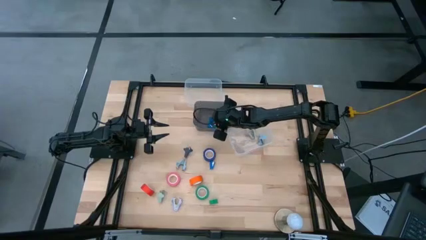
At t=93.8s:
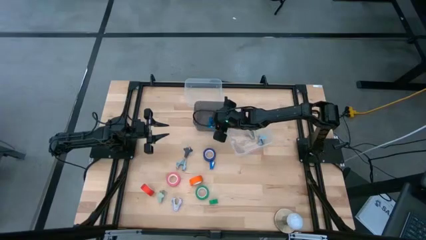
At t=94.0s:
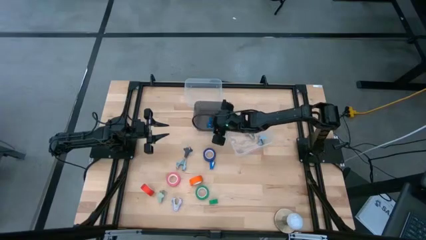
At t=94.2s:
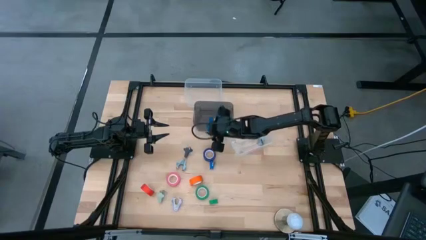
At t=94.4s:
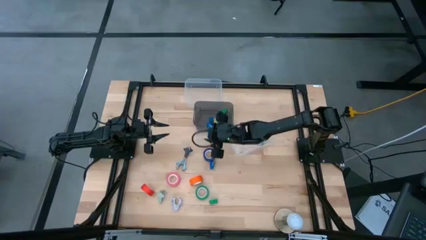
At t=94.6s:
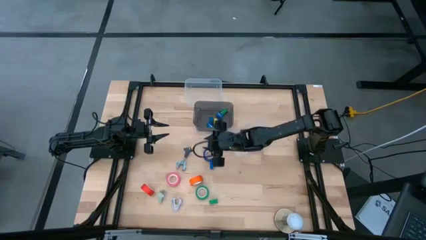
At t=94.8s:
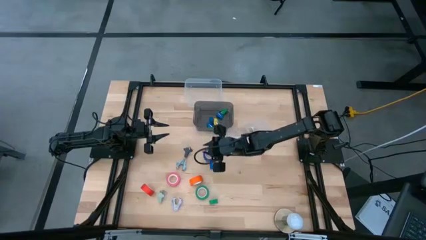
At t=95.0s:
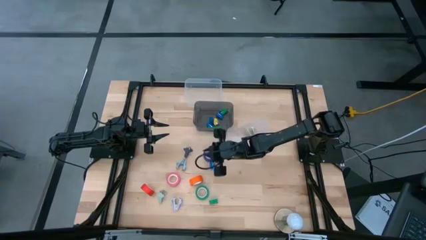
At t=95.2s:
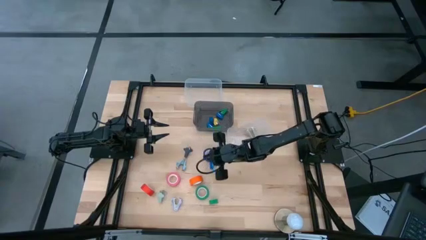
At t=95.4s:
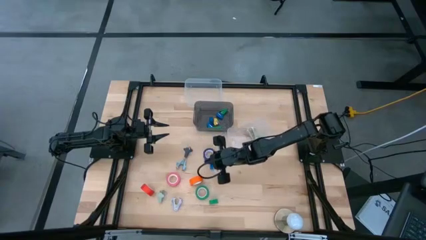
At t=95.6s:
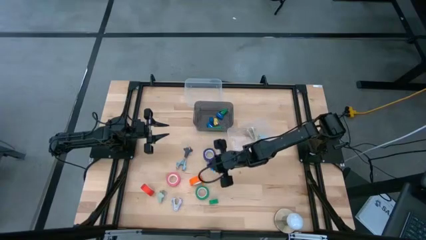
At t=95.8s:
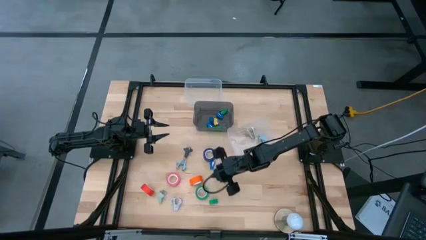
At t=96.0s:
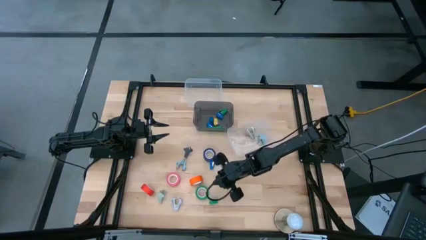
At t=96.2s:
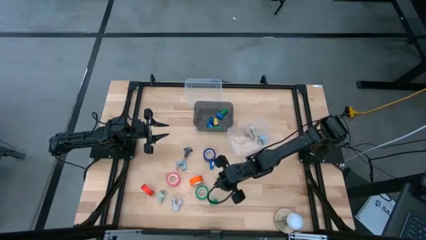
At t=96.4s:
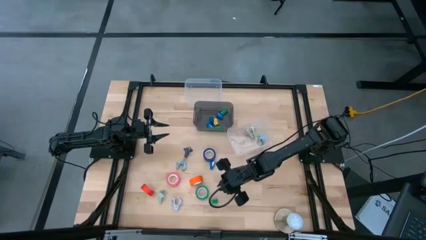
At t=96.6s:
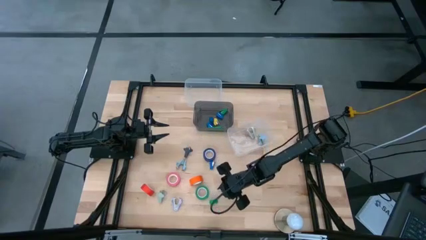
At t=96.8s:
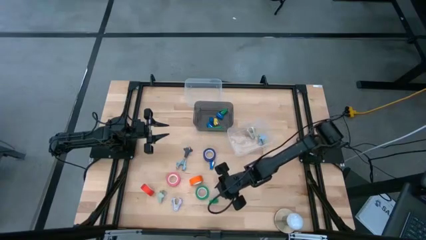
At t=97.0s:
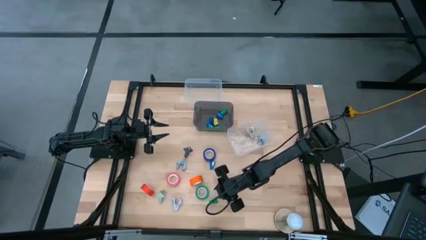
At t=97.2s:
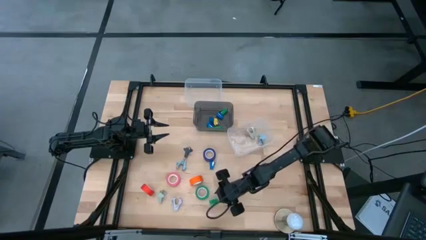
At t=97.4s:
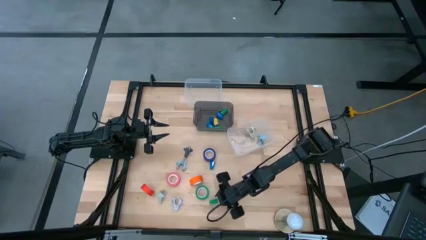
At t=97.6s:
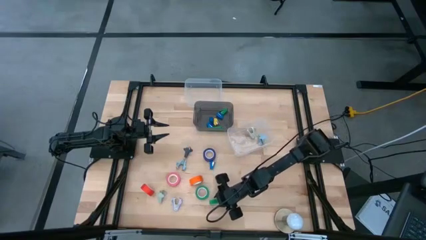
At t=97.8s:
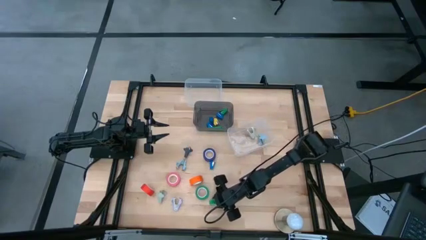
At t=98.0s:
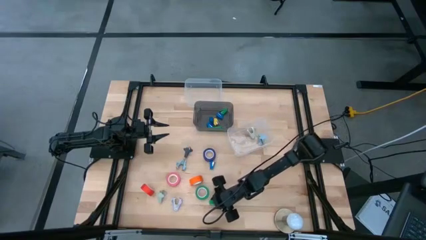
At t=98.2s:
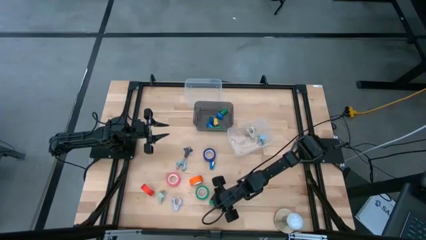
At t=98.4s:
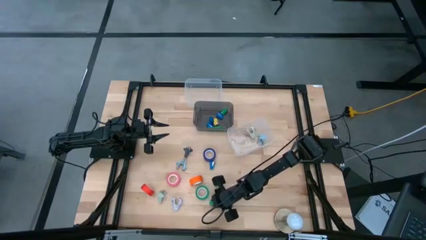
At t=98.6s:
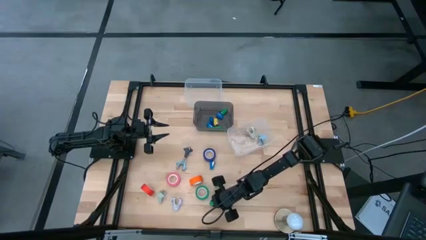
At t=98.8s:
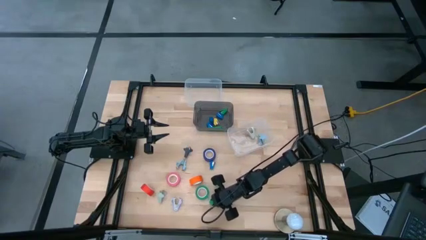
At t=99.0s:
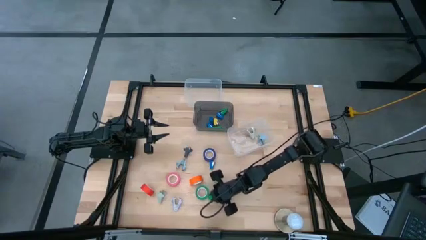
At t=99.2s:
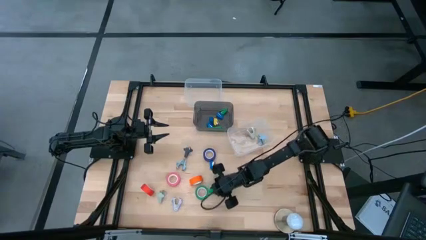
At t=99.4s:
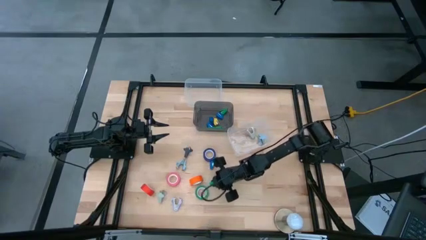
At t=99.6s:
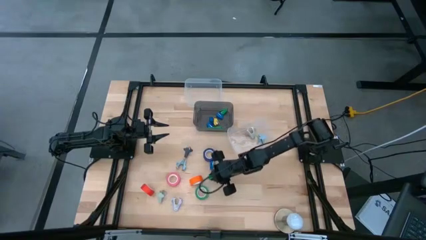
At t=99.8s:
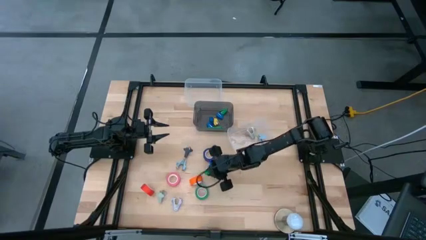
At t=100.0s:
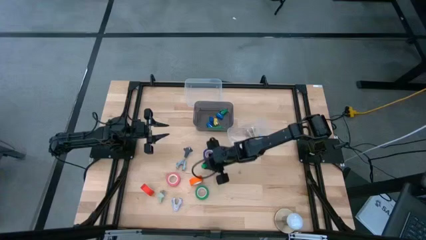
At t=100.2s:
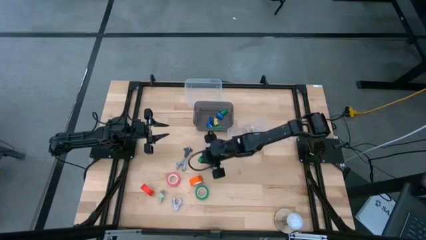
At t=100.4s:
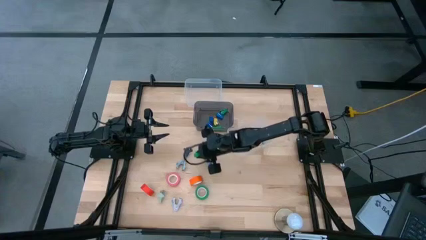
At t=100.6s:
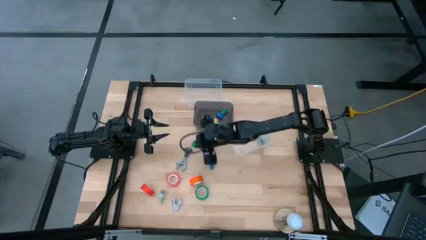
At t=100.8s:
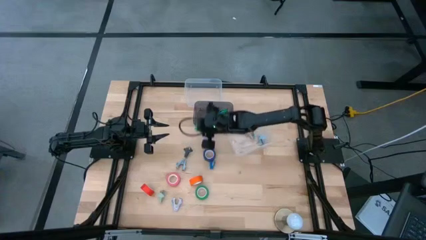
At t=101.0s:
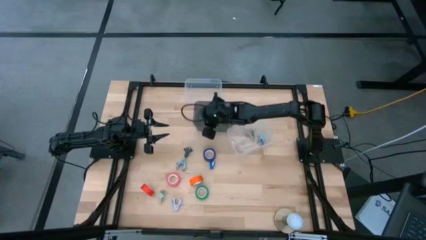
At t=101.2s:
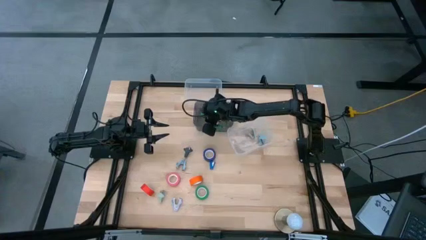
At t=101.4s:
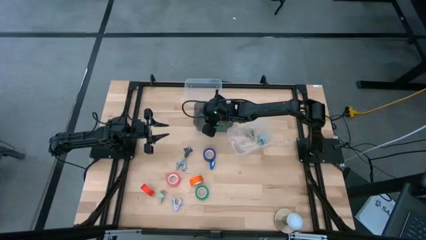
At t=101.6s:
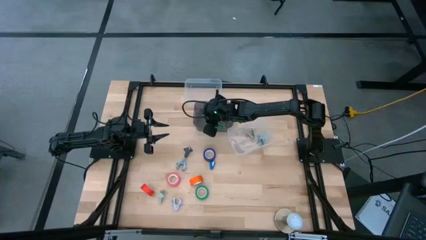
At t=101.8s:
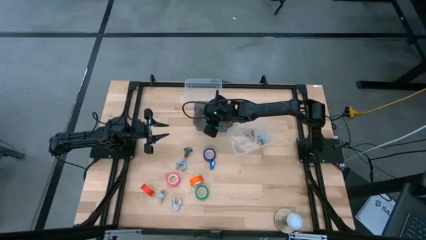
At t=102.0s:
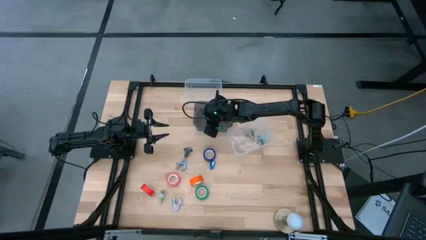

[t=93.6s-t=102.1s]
Task: Pick and place Stapler, Stapler remover, tape
Put the green stapler into the black bin

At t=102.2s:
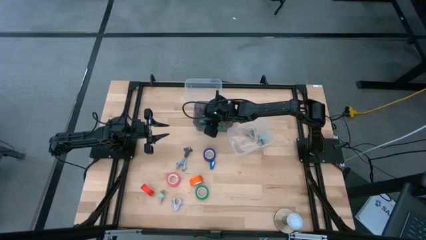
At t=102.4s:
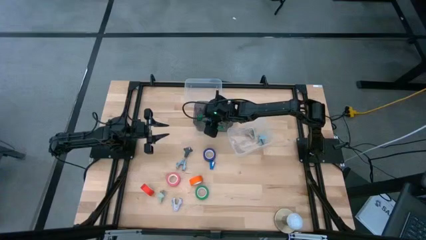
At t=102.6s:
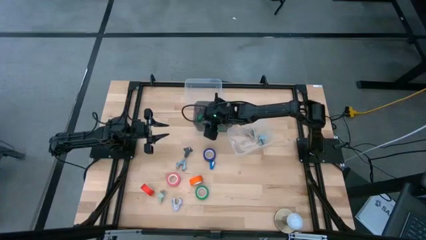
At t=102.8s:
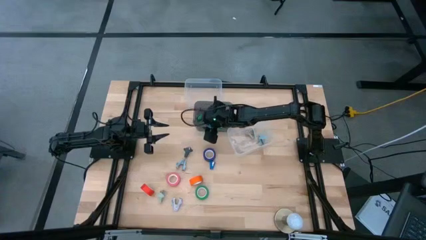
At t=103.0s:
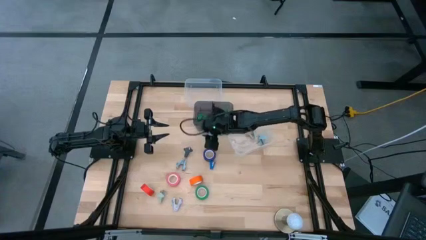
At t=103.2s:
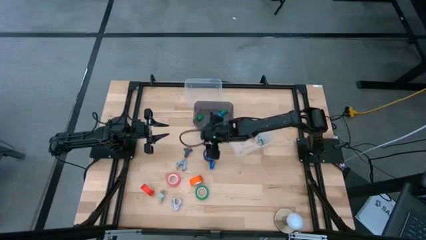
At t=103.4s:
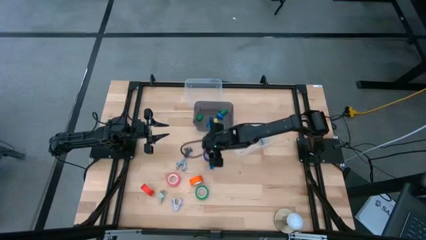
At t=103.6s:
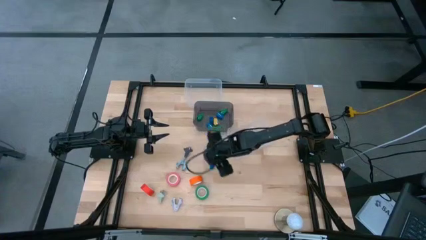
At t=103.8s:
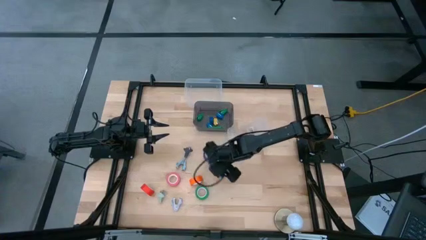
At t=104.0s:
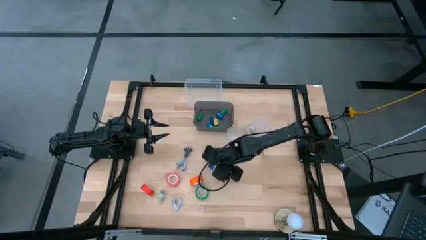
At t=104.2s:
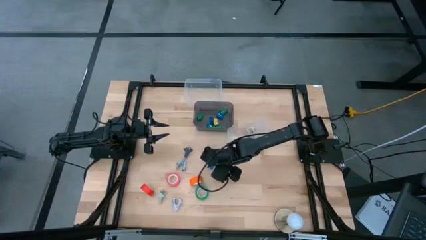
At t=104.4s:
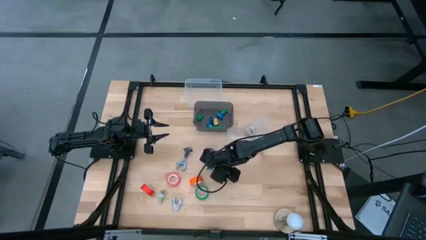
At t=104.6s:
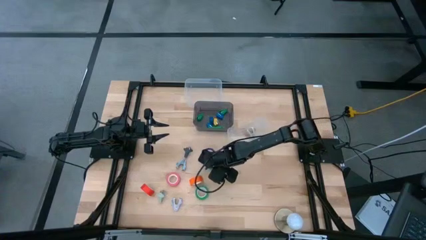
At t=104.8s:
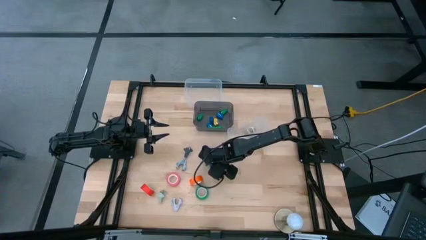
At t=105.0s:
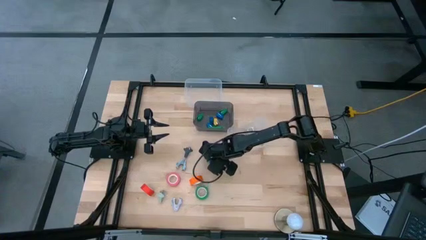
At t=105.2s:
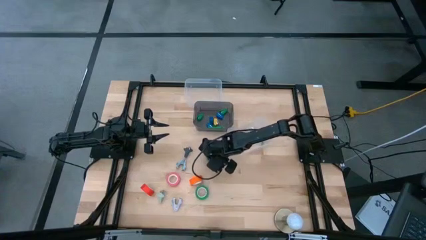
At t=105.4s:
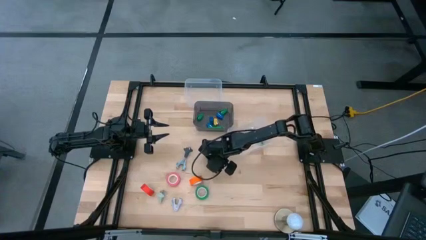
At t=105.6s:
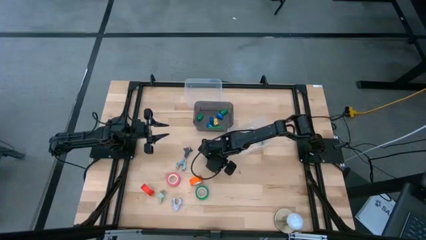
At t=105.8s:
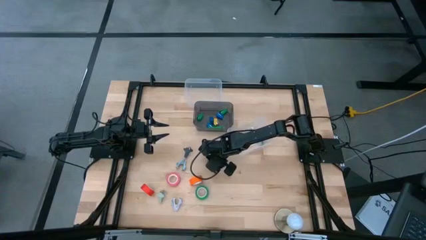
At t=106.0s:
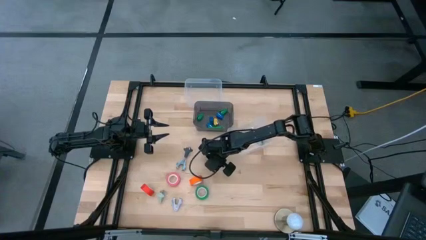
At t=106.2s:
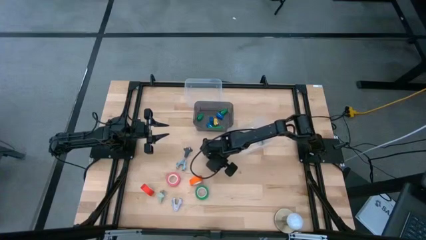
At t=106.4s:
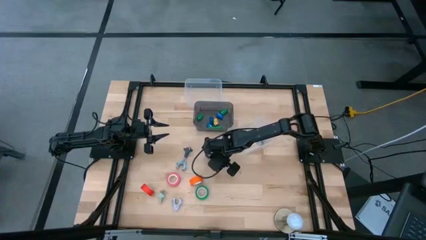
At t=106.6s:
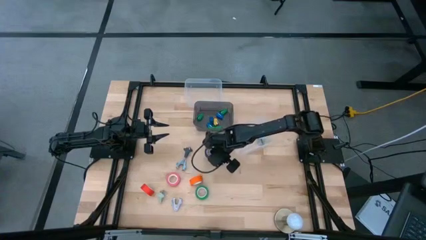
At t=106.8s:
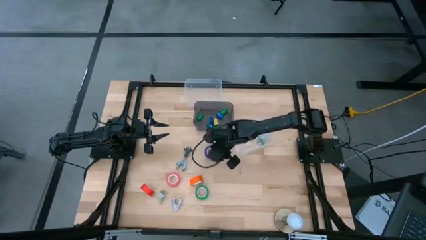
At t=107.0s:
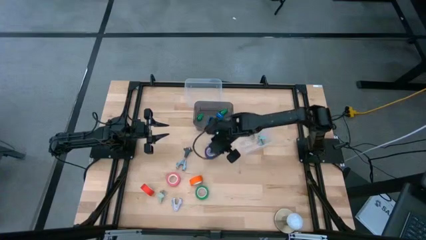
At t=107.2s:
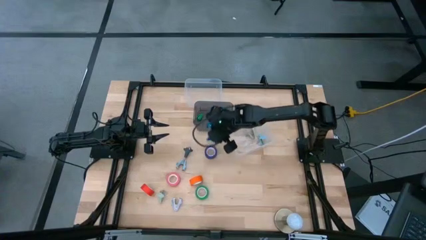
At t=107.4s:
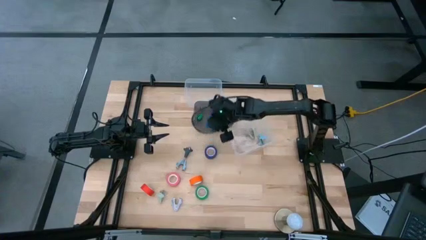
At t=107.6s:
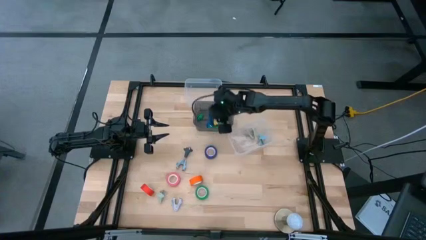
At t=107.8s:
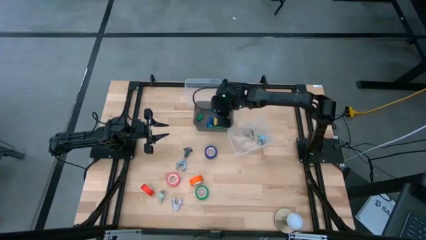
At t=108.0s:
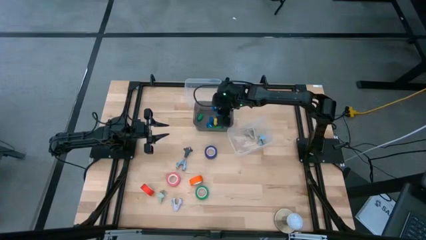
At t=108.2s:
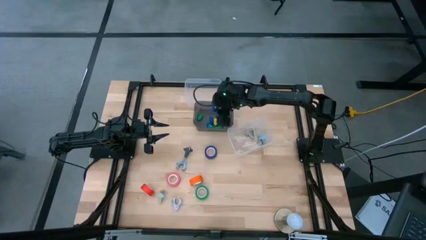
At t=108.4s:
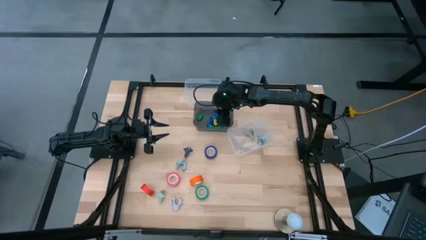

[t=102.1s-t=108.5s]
Put the blue stapler into the black bin
